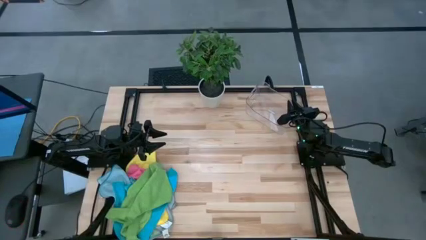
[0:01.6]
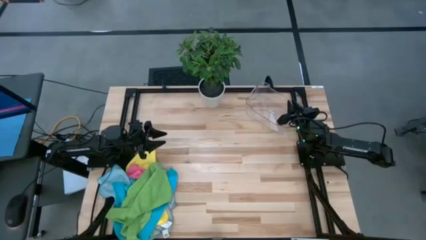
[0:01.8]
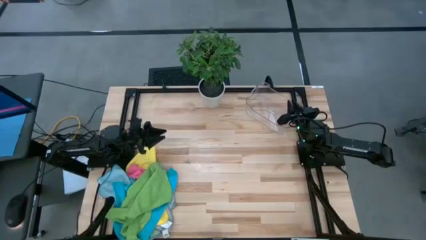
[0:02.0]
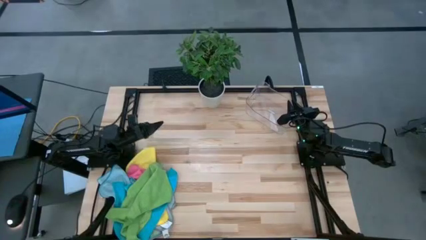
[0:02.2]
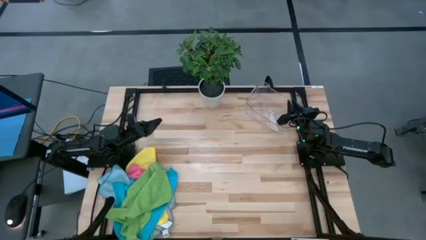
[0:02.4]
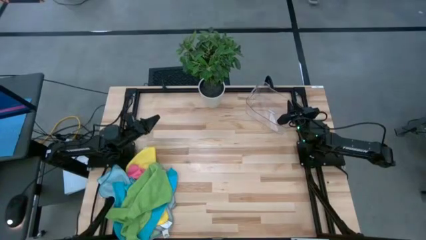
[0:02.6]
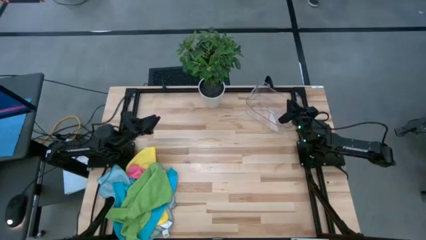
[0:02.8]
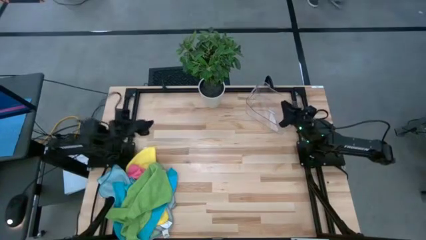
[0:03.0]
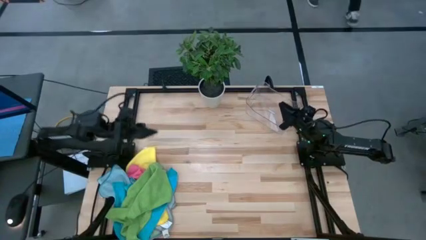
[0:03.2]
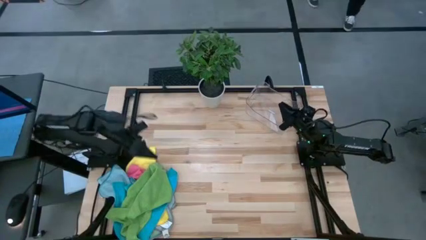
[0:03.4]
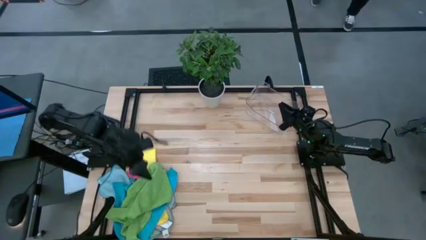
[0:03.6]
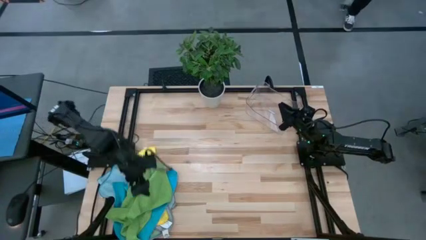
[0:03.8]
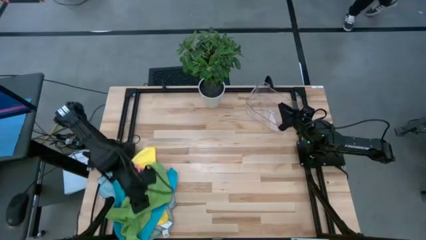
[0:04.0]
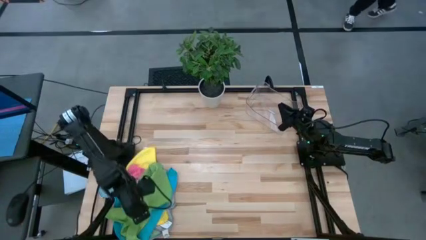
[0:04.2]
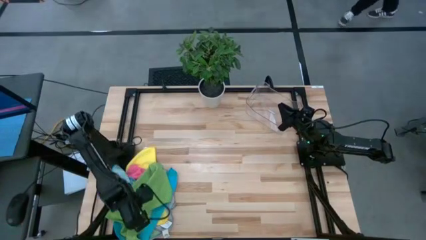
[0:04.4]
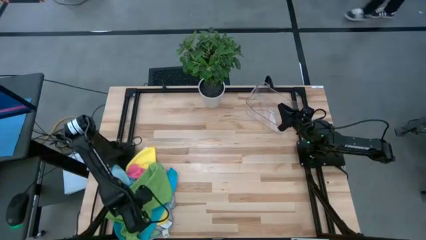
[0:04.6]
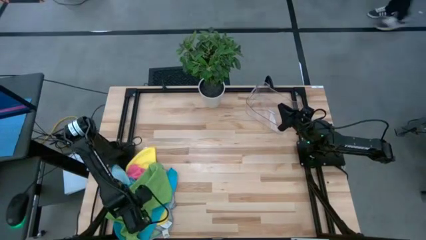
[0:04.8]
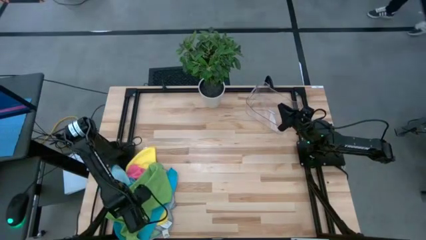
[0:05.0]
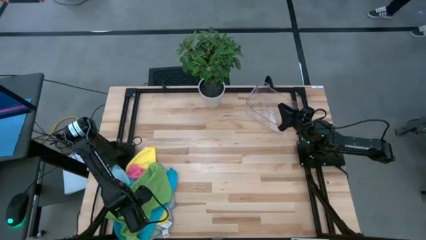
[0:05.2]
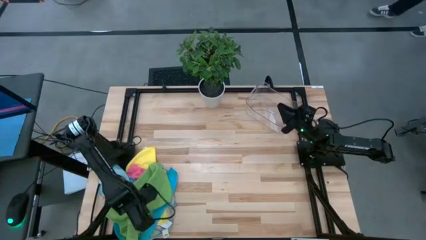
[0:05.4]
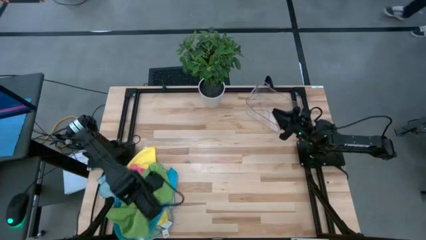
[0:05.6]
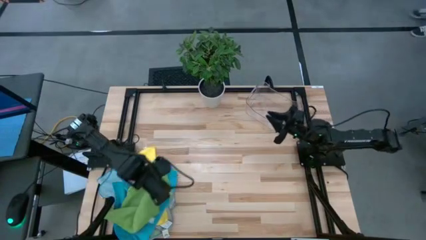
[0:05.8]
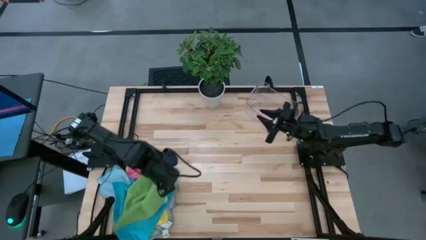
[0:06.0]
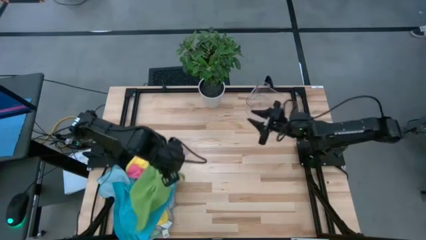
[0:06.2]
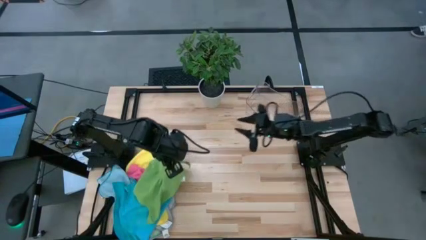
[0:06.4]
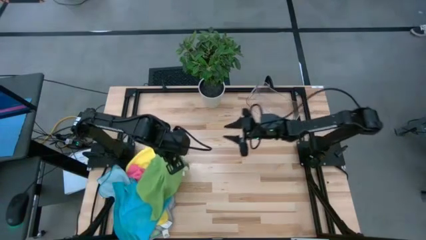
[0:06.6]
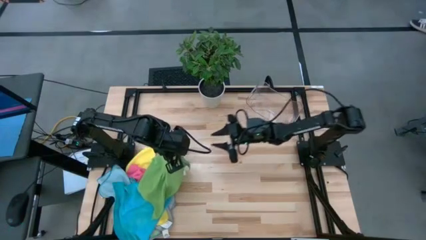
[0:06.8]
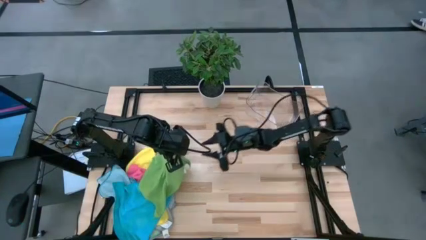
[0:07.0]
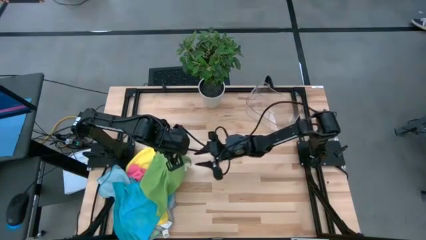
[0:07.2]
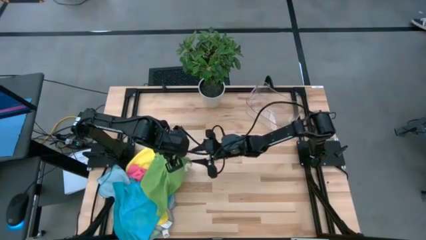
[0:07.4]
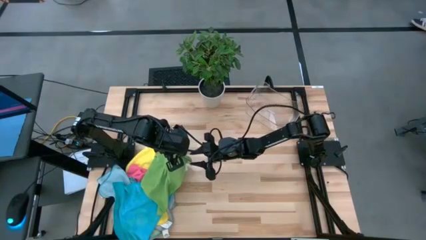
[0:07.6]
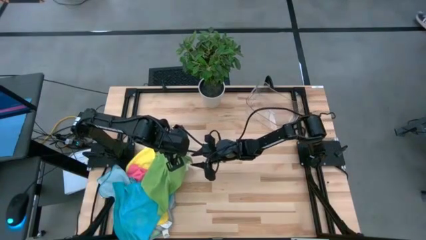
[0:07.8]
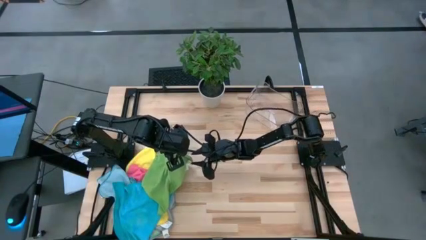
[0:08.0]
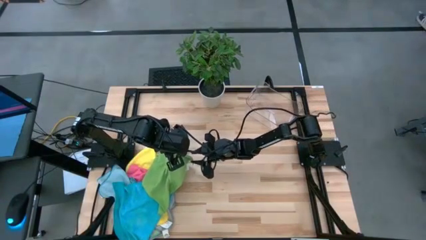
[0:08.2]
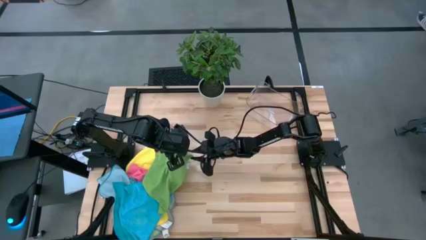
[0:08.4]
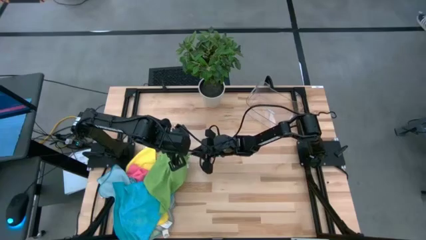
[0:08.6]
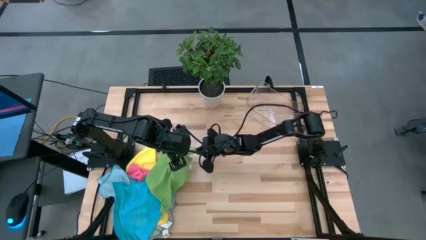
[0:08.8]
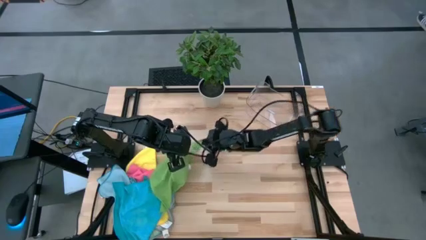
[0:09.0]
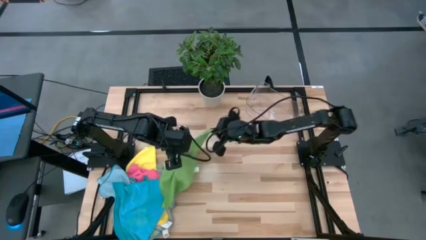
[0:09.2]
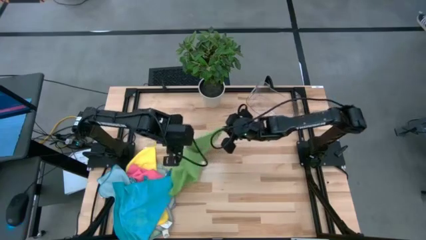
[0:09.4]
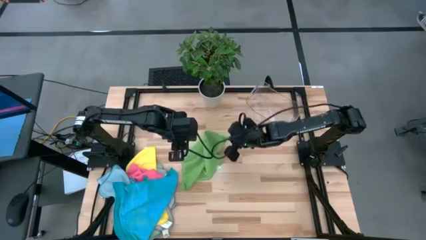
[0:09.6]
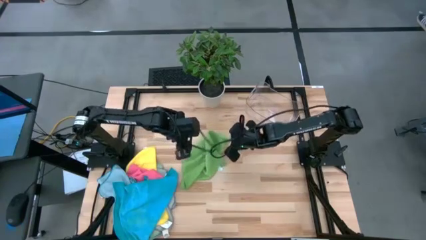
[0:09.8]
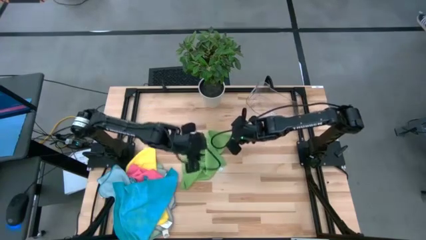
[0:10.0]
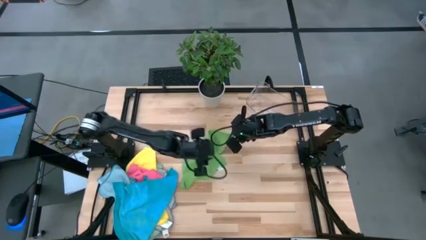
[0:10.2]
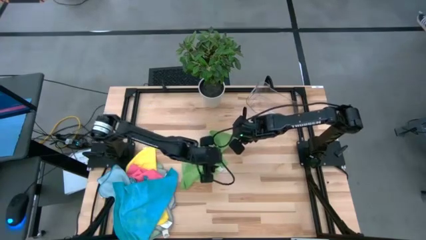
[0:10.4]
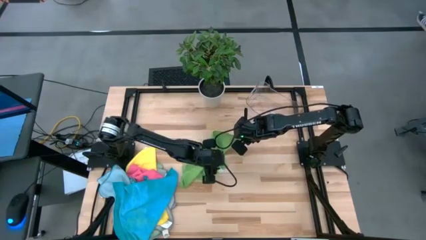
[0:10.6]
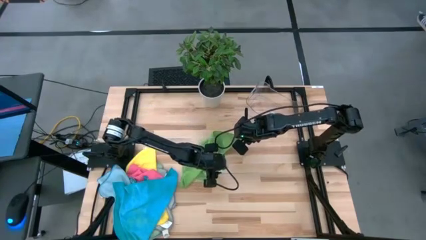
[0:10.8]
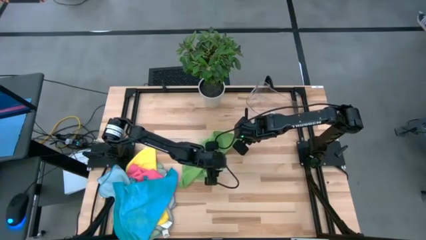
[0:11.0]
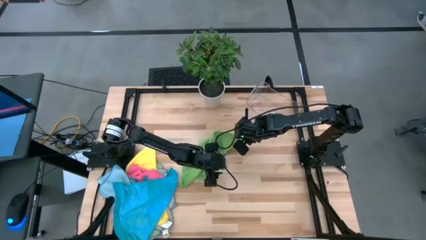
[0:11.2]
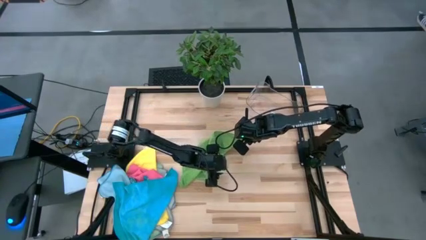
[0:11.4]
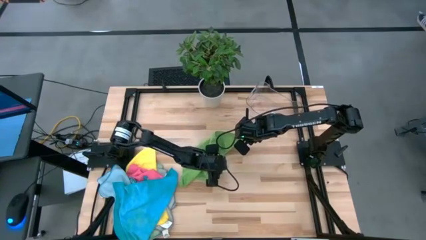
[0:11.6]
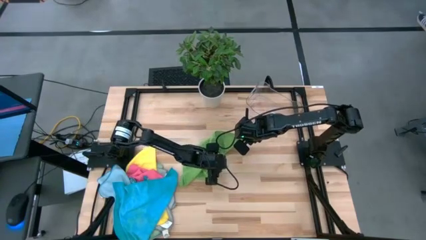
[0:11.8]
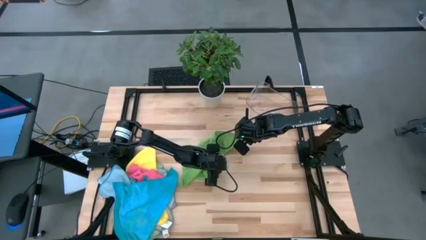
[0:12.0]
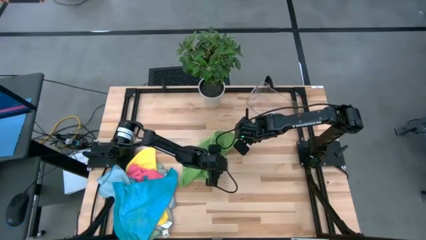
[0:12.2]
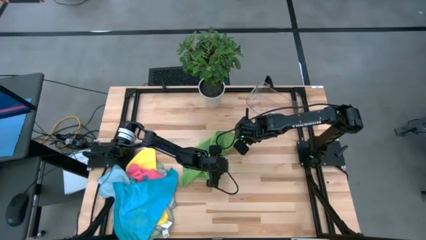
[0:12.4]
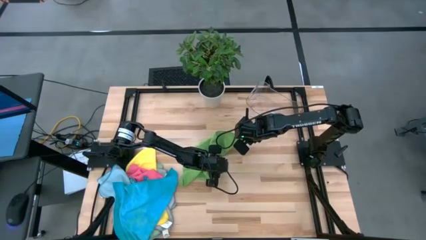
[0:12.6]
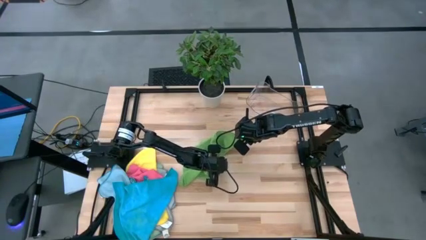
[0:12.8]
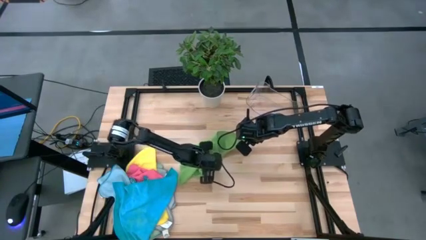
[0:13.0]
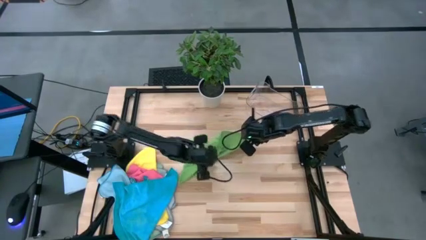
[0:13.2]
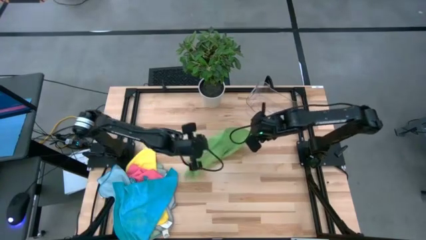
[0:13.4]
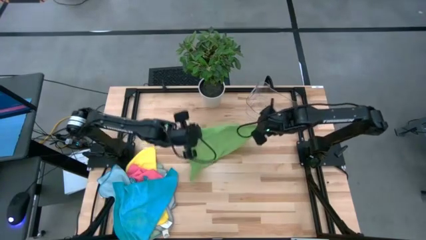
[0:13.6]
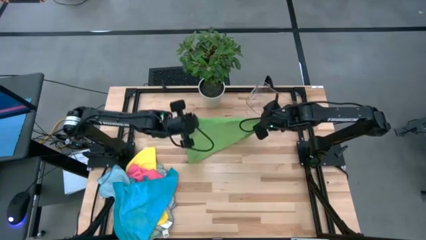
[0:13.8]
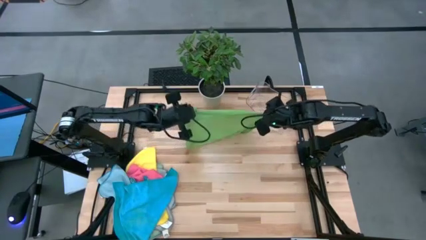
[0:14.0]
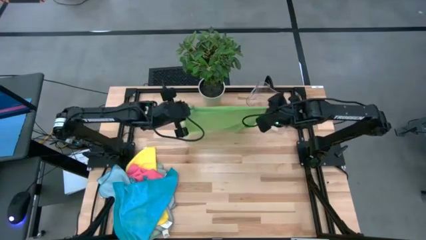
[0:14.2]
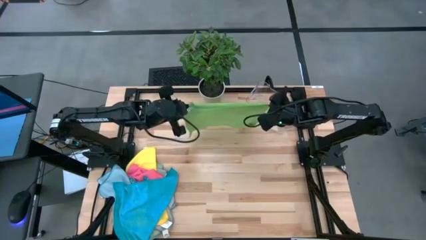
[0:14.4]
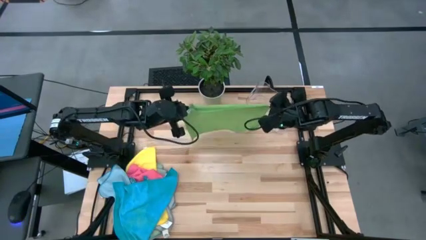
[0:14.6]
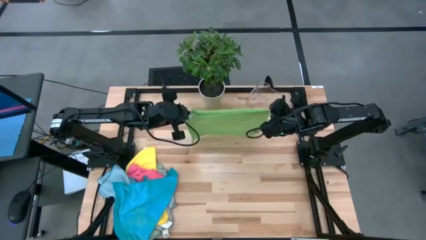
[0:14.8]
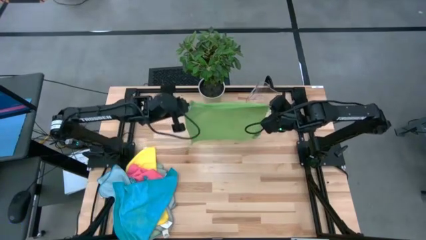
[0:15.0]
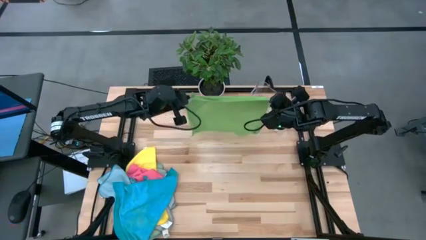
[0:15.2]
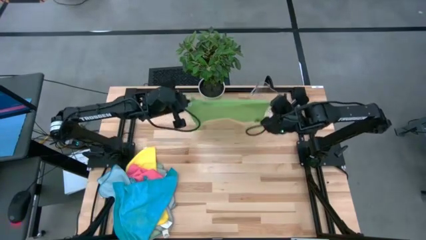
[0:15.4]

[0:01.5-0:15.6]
Task: Fold microfiber towels
Fold the green microfiber towel
